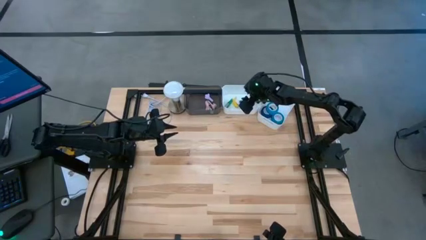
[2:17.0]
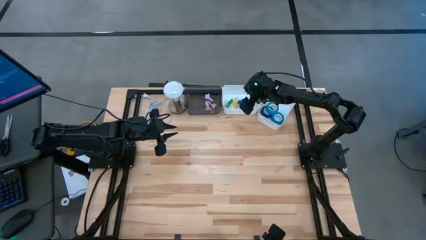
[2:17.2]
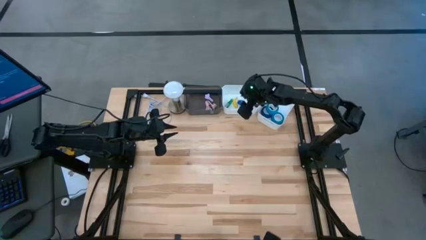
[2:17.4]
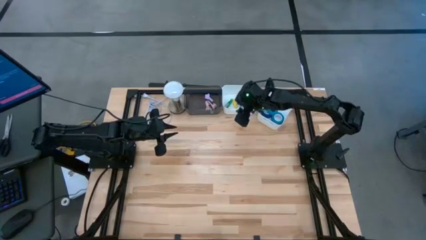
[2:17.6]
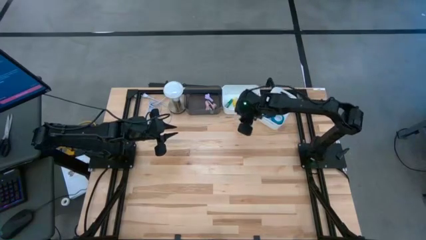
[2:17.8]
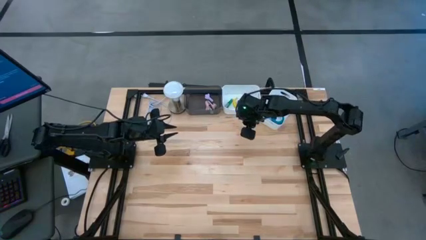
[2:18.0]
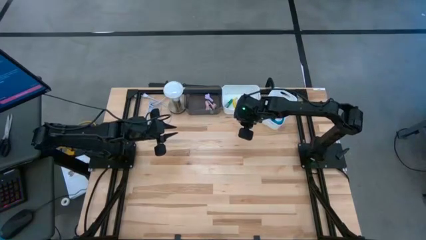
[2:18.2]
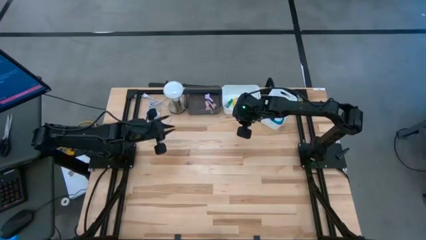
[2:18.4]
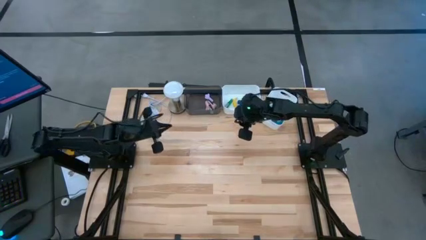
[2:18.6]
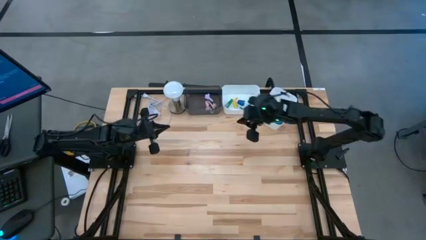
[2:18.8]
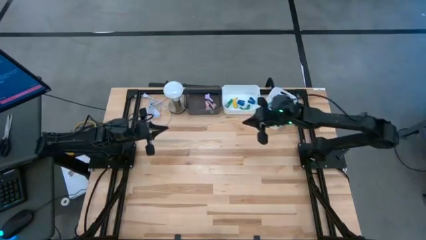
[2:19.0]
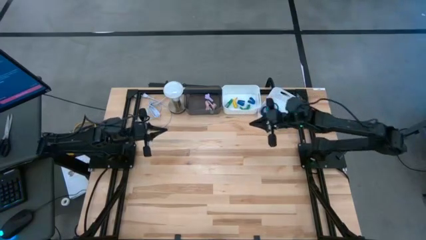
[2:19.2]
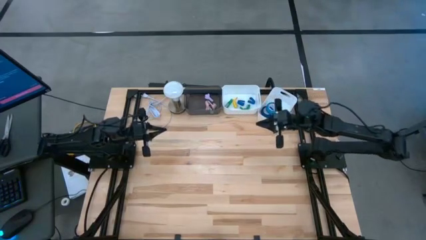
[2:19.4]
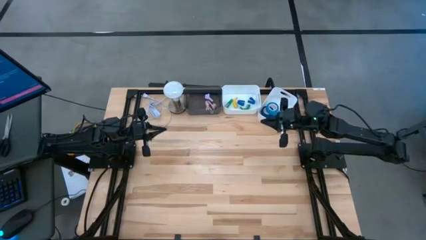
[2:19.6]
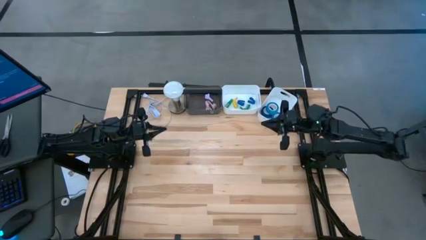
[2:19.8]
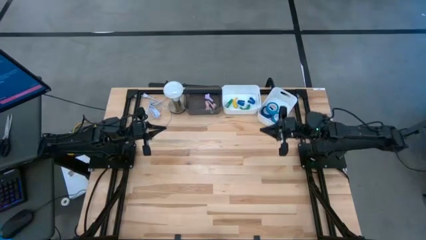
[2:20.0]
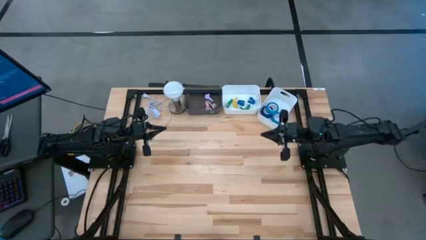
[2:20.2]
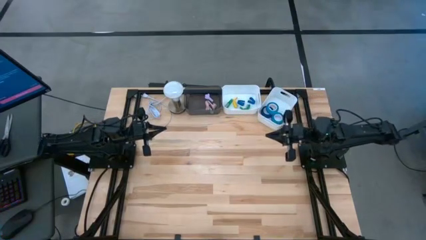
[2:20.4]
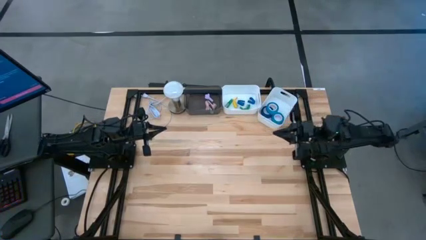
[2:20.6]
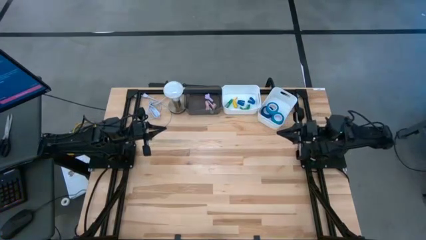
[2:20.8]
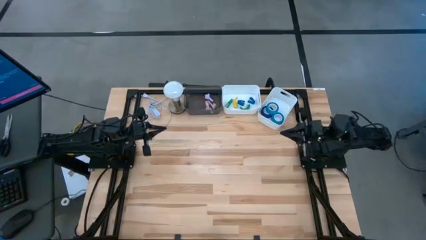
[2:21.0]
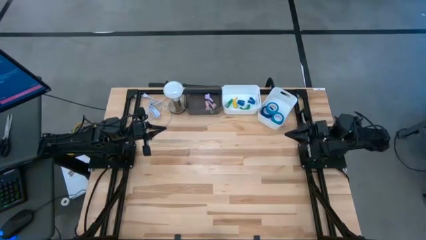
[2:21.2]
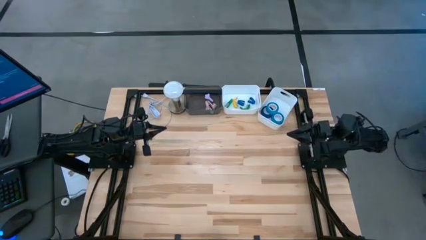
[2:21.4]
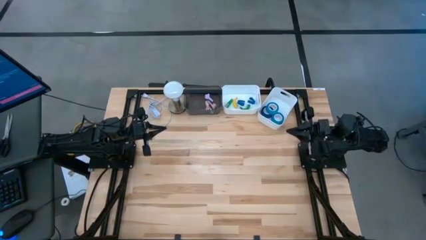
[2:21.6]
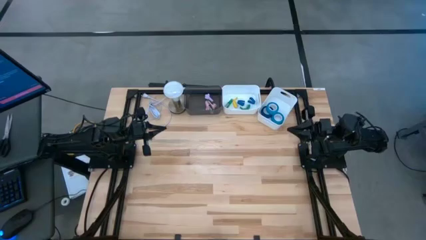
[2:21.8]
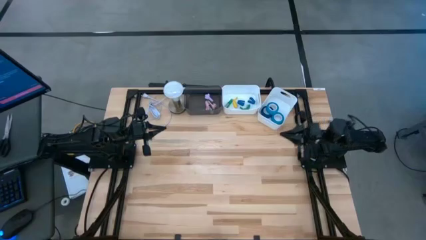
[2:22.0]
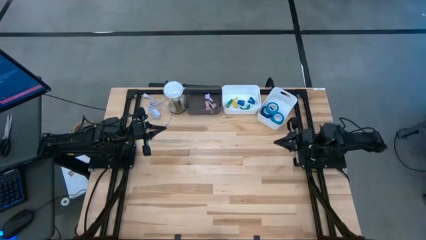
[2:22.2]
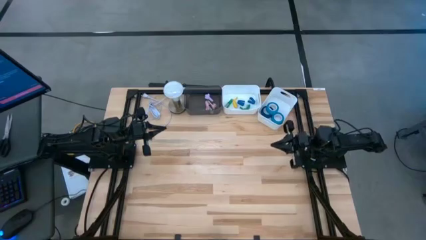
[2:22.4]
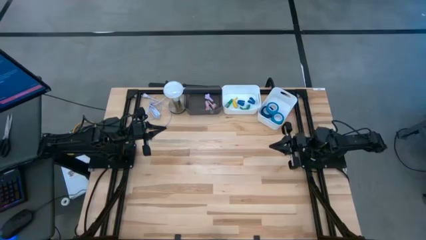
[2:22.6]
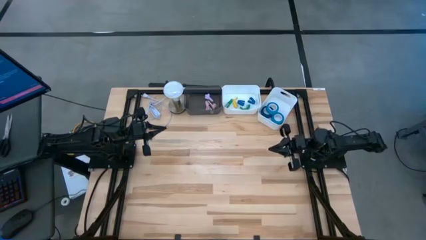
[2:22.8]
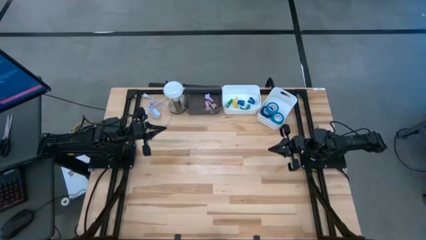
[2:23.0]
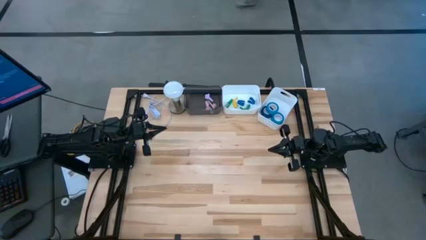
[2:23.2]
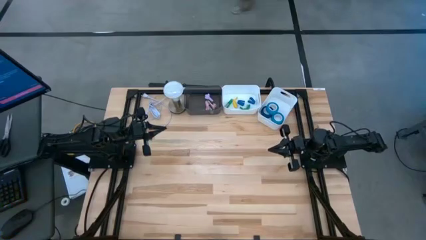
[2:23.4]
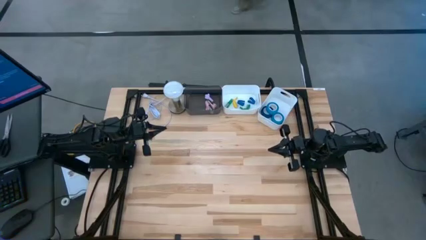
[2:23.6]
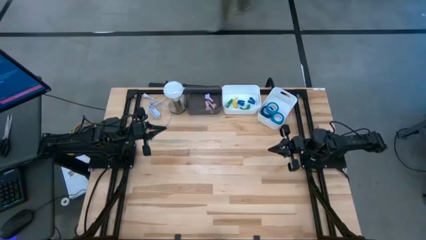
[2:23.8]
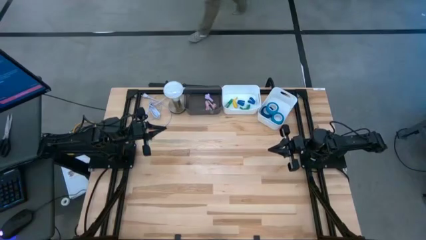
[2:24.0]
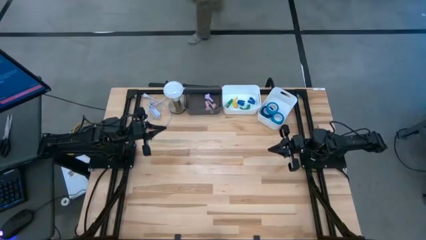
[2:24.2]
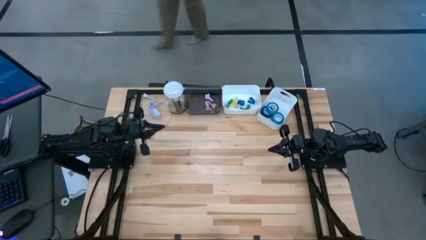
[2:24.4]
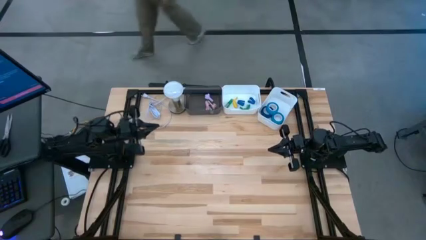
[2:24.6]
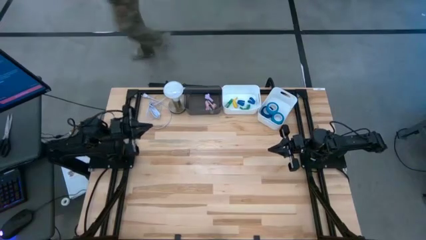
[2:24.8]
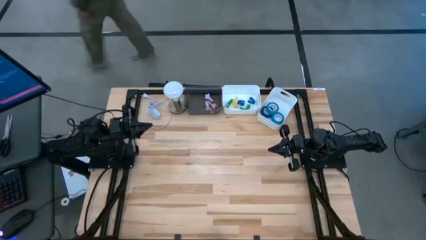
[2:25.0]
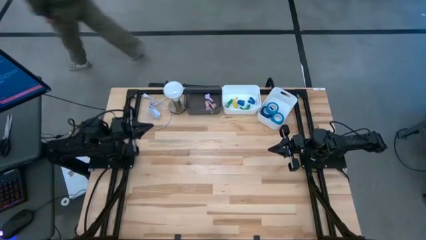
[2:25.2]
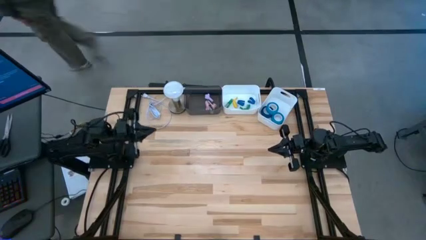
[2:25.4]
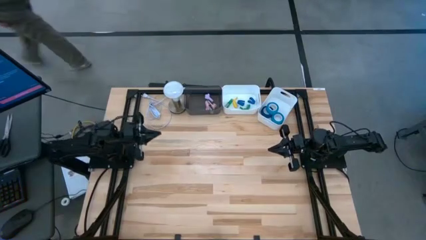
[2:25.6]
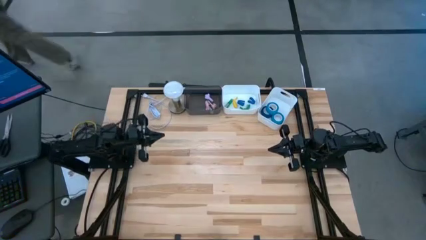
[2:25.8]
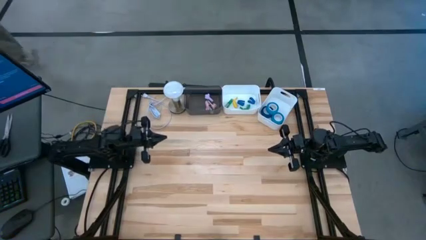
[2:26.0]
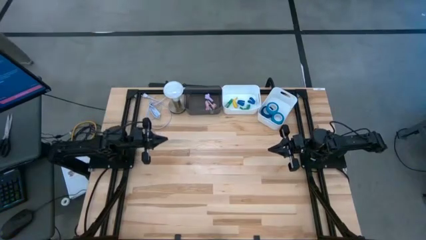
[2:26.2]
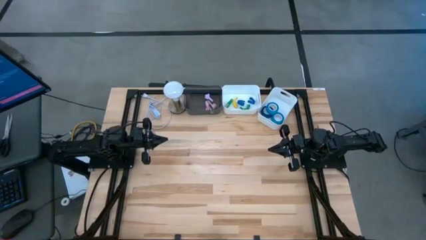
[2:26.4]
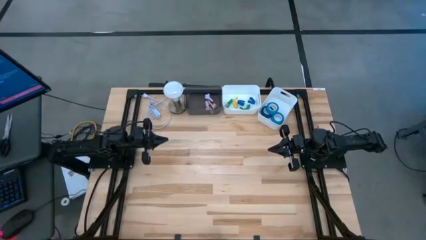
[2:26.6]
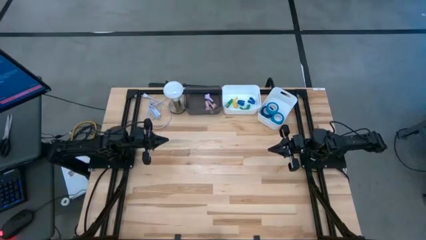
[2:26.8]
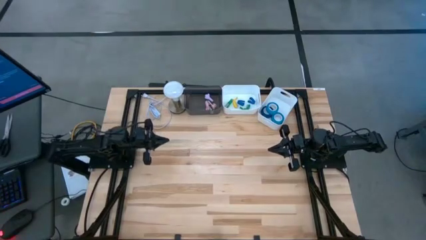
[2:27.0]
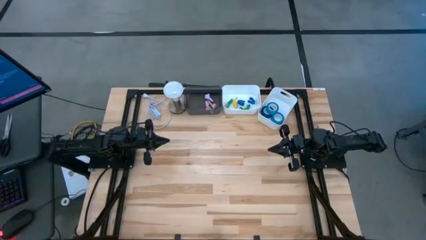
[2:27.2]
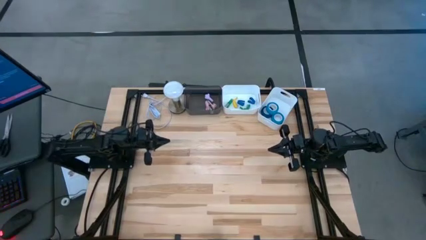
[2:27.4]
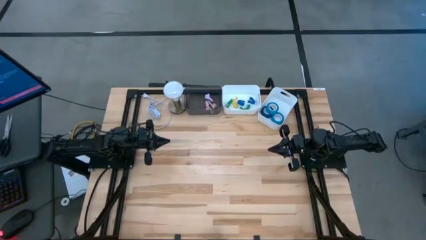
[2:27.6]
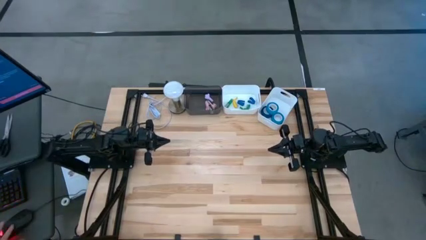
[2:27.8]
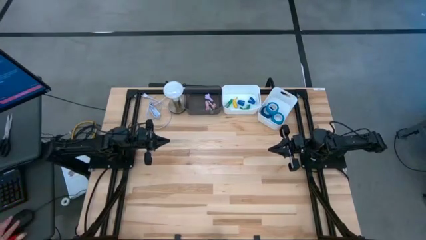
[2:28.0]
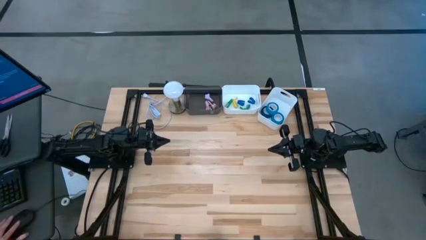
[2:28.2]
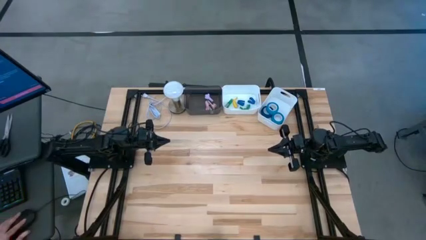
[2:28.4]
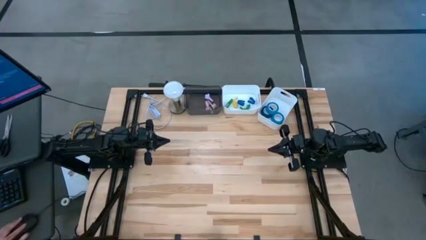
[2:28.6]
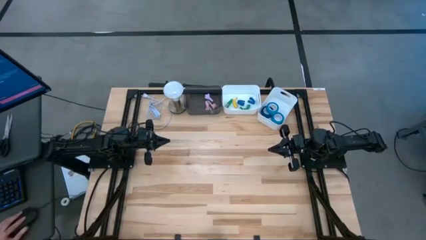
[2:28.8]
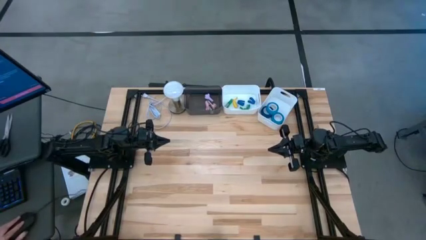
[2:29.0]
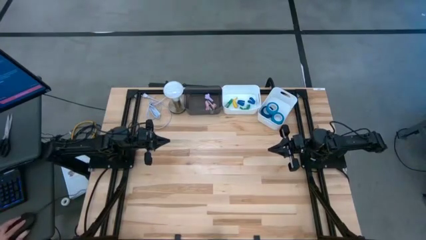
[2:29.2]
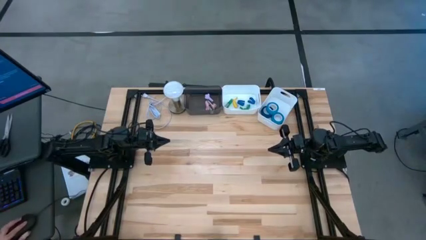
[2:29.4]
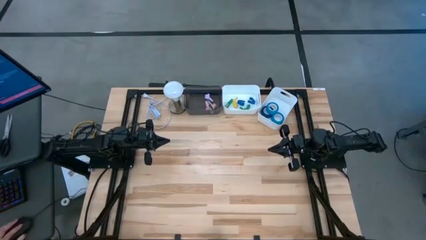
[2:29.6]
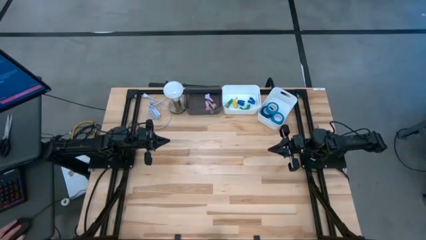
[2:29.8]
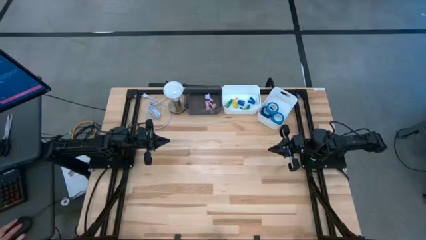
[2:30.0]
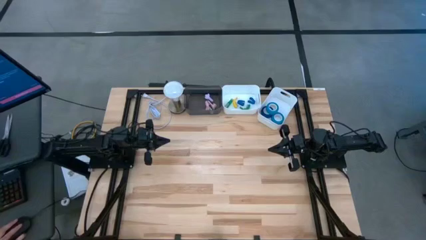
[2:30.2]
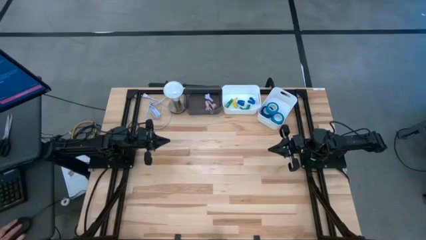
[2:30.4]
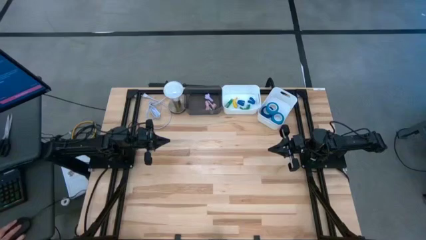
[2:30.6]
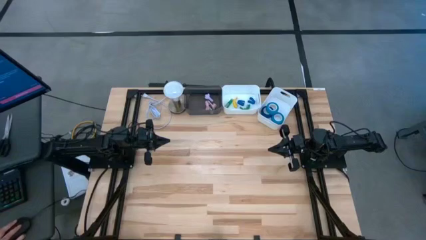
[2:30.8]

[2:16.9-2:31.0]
Task: Pick and place Stapler, Stapler remover, tape
Return to Home Position
